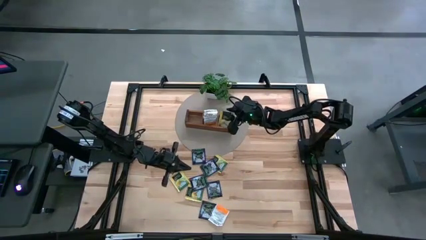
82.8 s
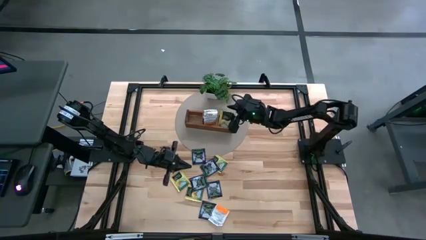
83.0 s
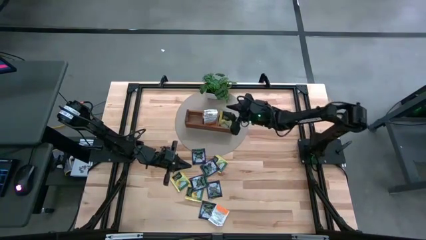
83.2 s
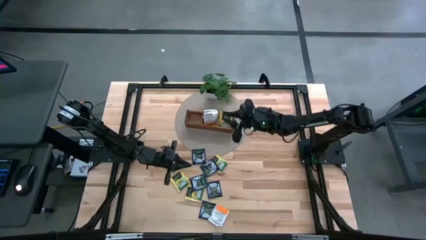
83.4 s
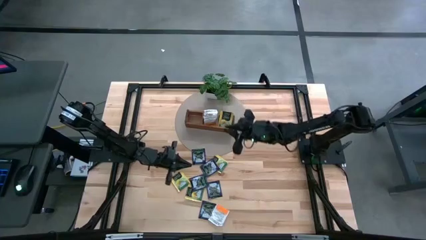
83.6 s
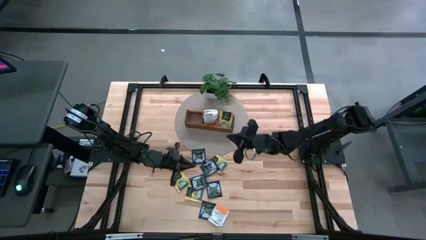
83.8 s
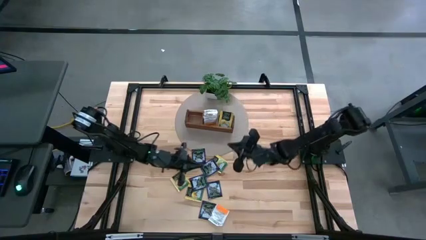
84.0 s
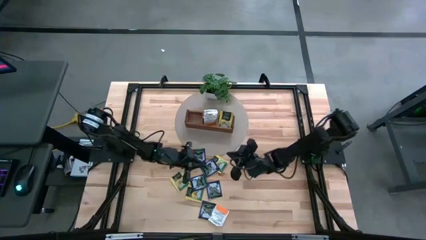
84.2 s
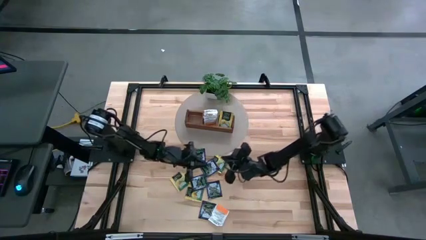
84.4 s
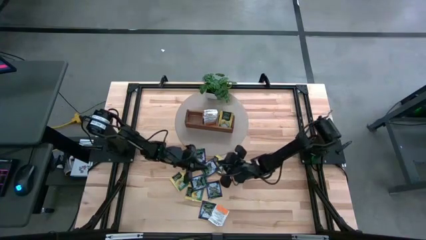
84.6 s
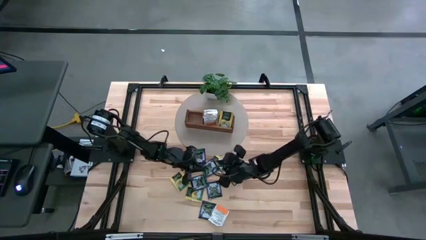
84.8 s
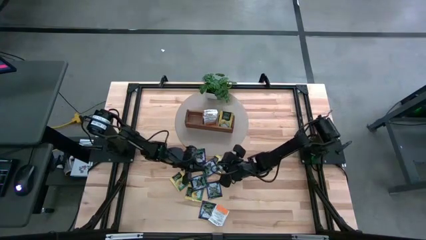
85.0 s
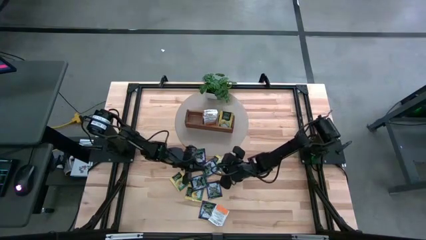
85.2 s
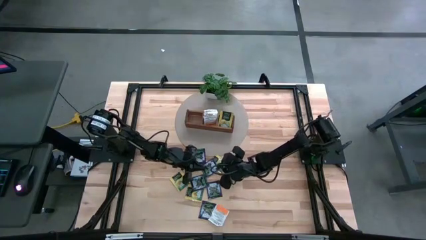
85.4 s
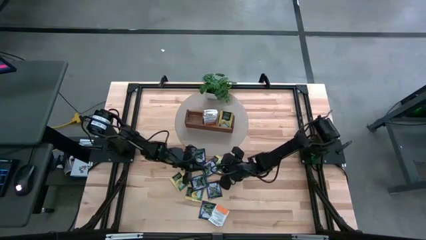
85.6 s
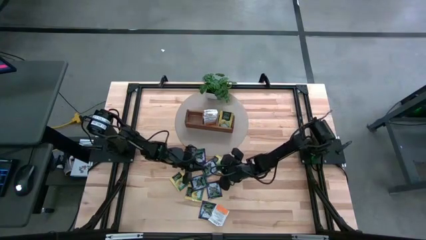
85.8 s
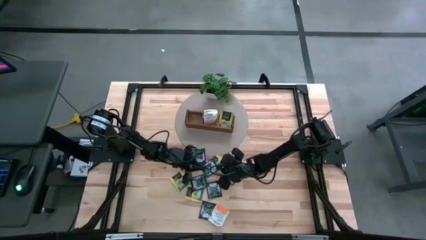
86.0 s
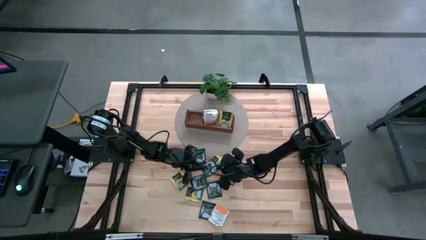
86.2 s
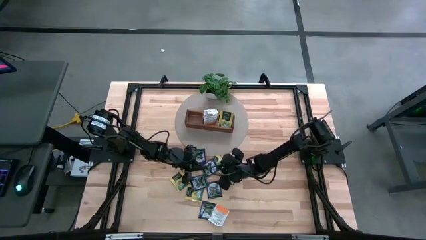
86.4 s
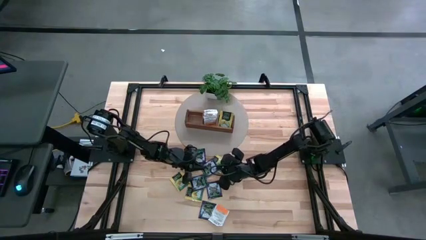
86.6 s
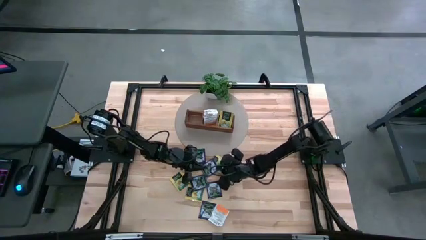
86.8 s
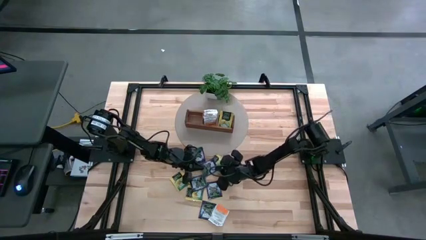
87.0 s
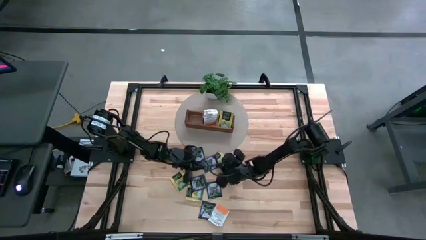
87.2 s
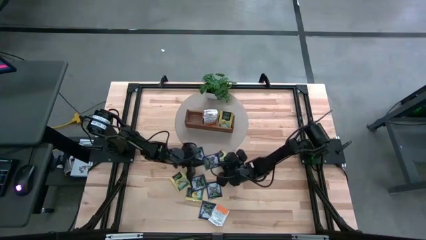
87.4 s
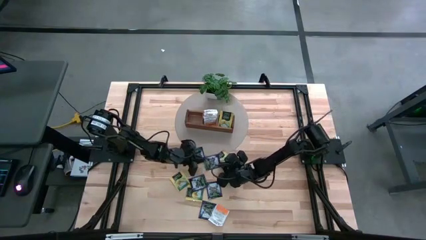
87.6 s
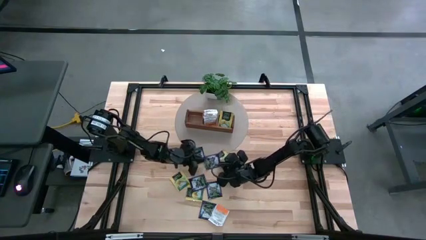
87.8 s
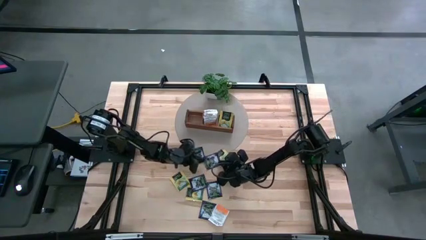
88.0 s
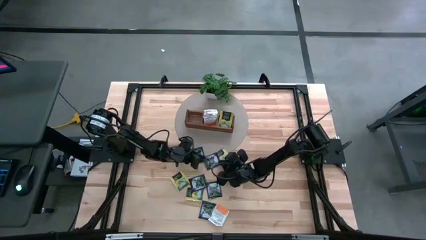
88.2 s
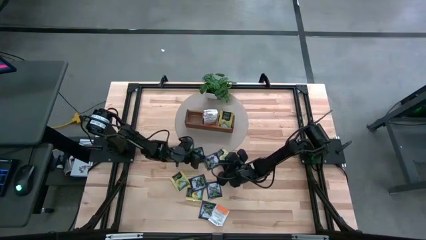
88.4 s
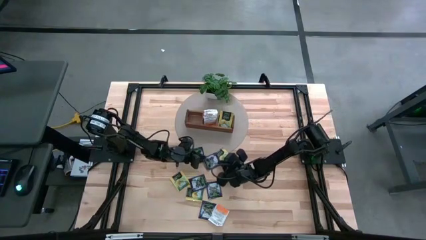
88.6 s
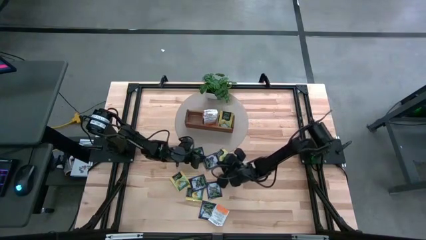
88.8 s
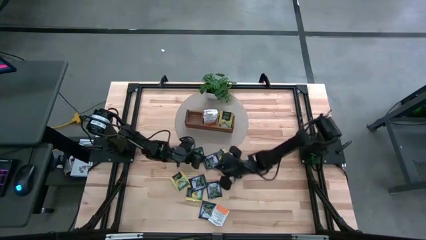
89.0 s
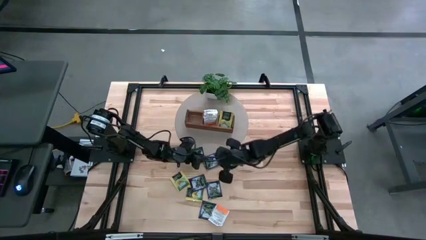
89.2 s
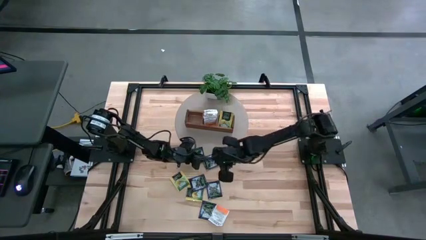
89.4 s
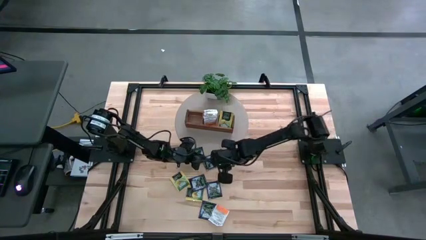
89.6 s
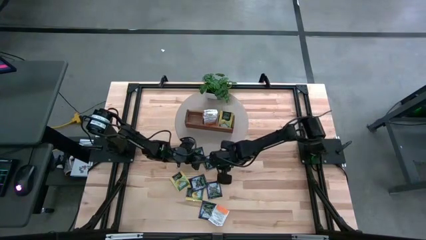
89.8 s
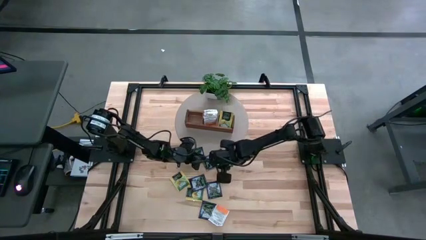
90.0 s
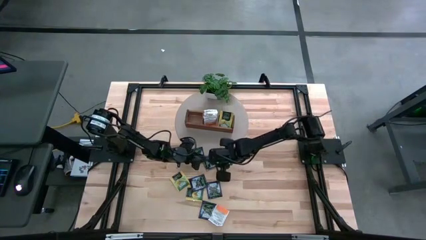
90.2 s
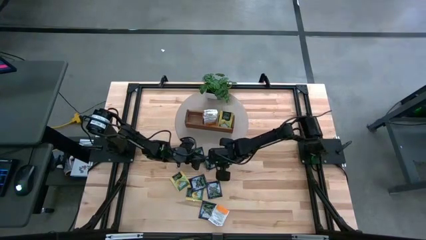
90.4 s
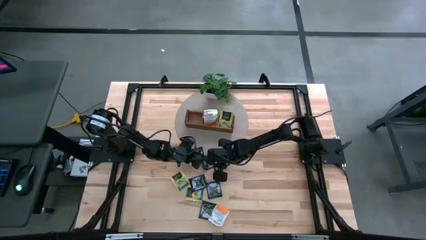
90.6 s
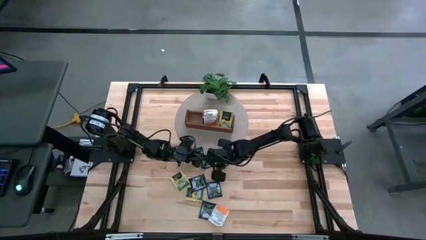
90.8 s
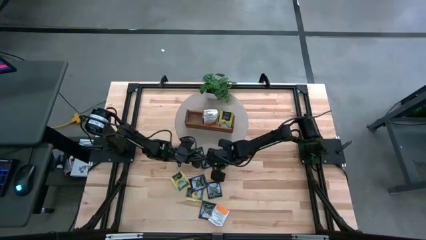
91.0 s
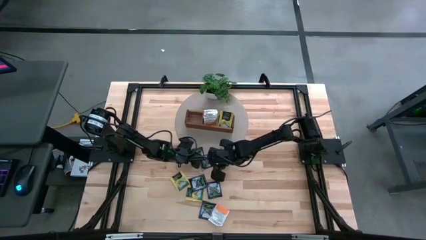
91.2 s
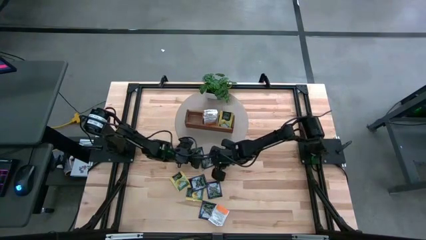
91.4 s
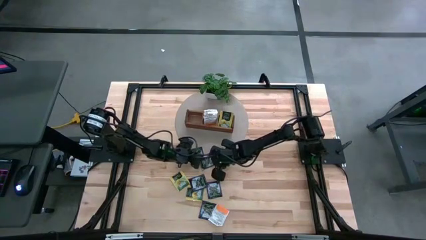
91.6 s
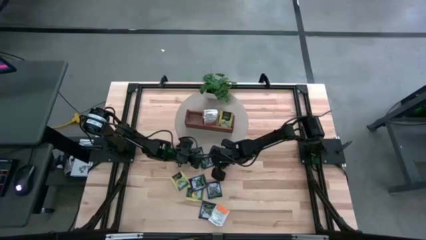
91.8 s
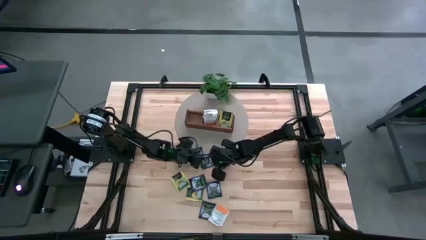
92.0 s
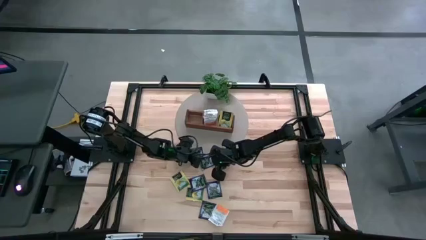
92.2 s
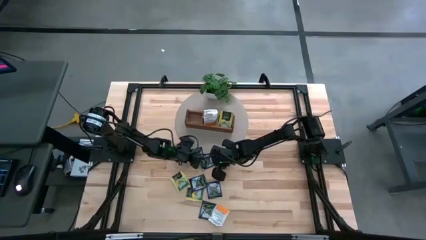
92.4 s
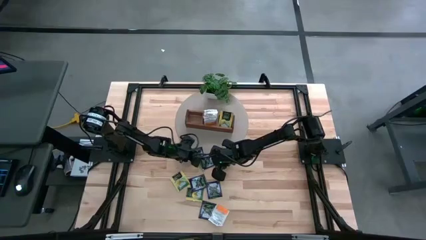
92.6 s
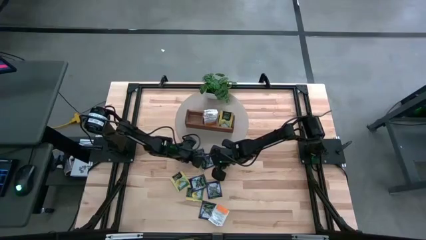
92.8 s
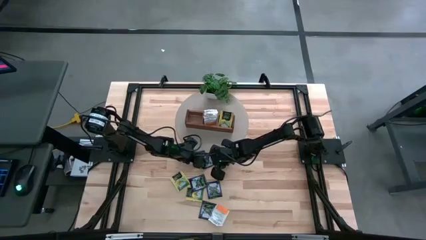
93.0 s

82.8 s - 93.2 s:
Task: Pick & Place Tea
Put the purple tea bag into the left section of the wooden organizer

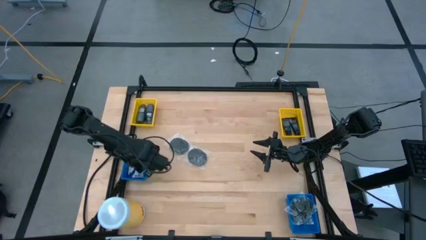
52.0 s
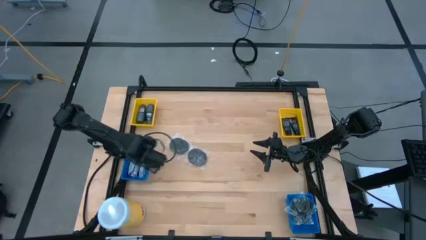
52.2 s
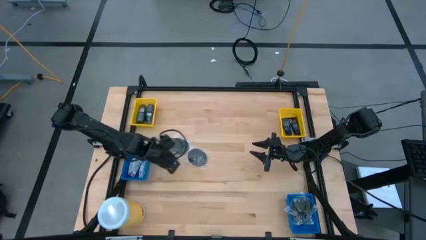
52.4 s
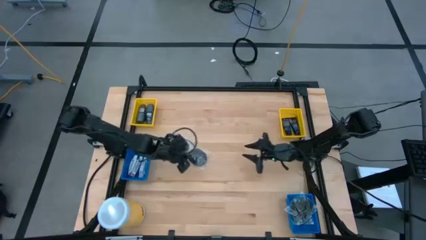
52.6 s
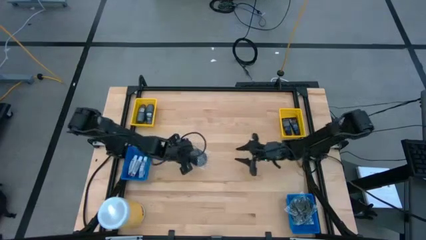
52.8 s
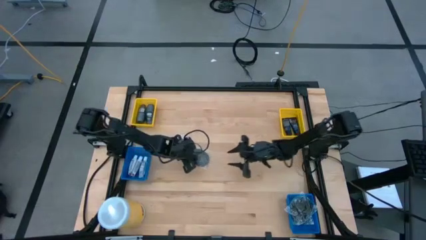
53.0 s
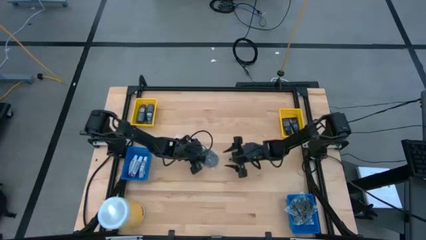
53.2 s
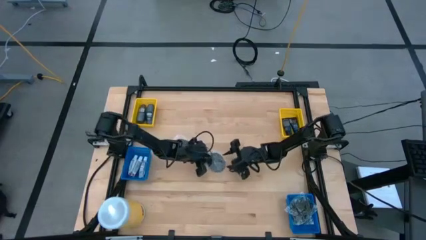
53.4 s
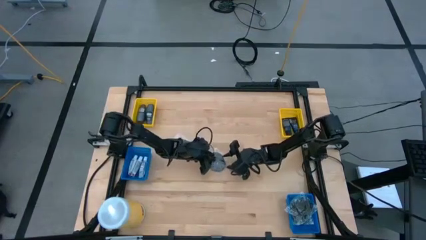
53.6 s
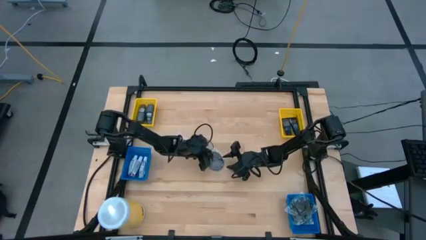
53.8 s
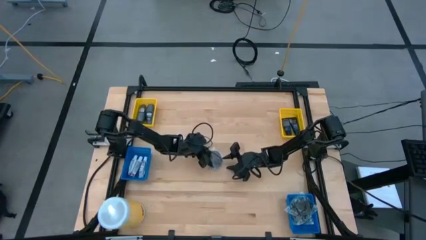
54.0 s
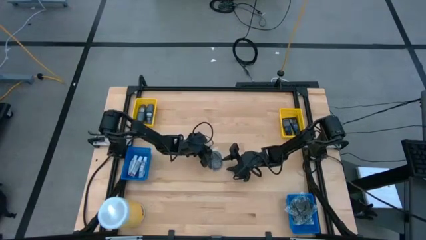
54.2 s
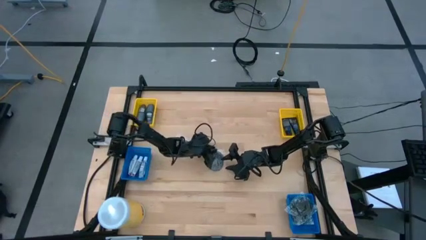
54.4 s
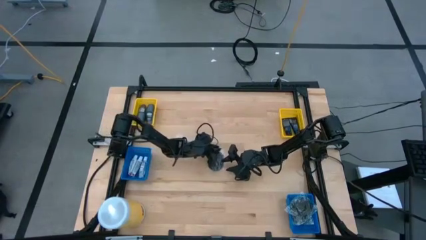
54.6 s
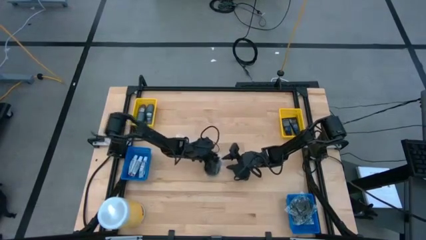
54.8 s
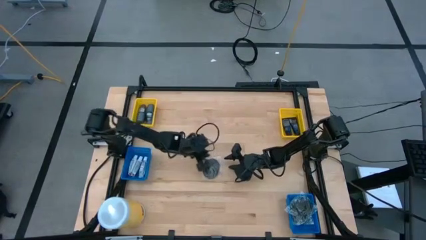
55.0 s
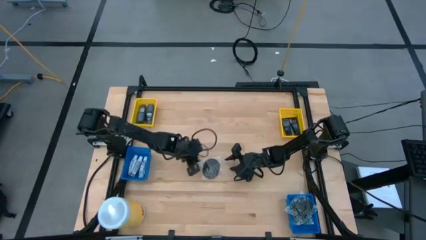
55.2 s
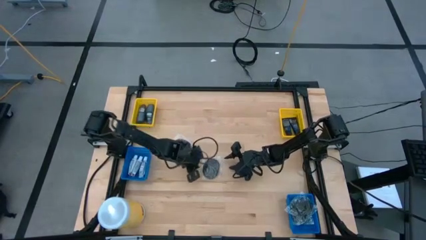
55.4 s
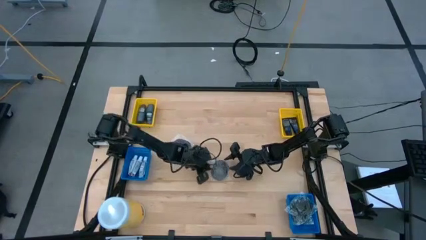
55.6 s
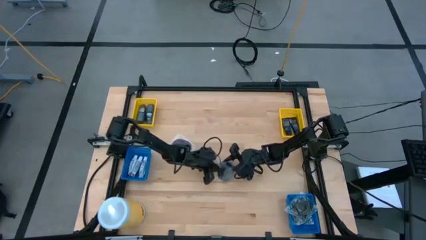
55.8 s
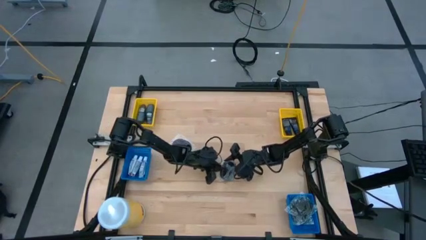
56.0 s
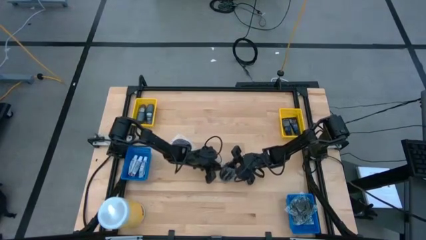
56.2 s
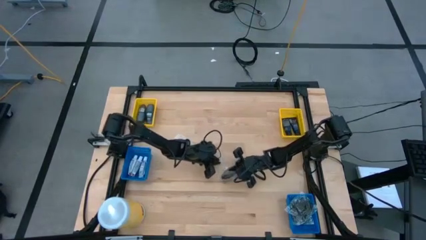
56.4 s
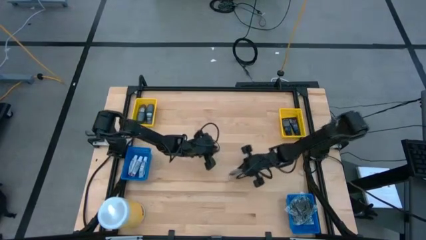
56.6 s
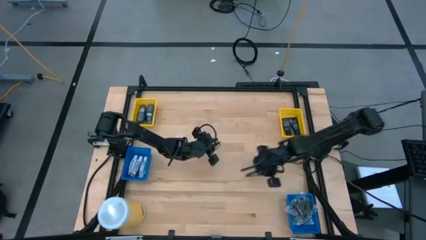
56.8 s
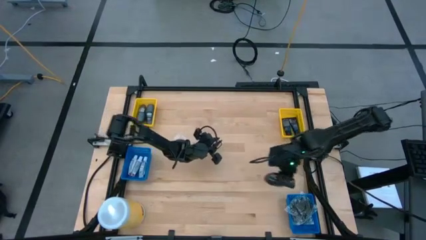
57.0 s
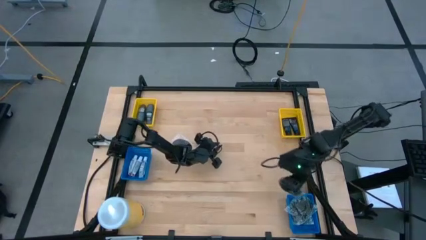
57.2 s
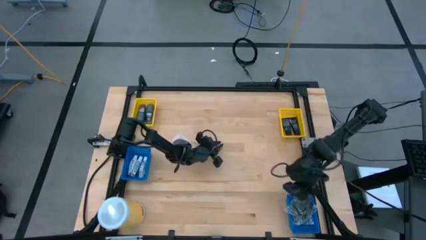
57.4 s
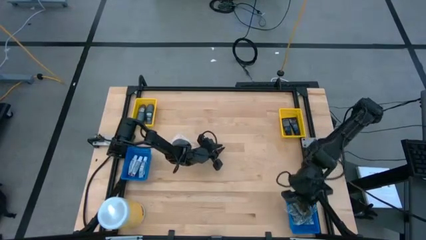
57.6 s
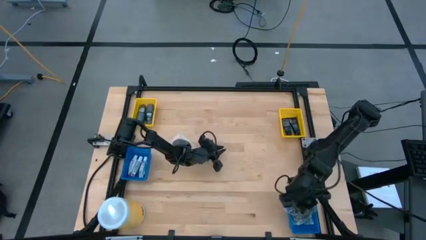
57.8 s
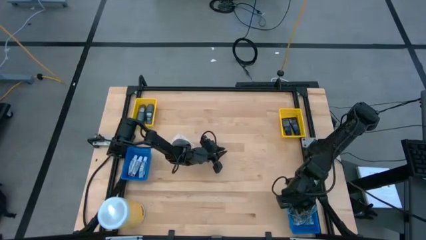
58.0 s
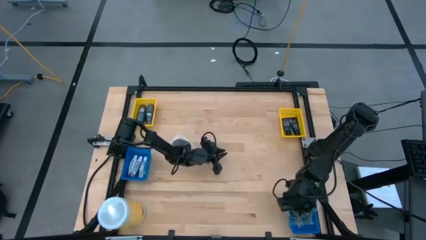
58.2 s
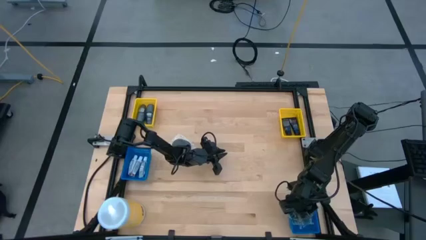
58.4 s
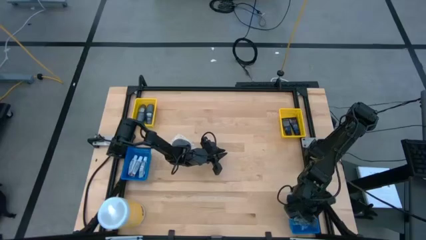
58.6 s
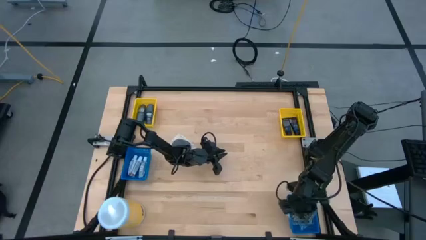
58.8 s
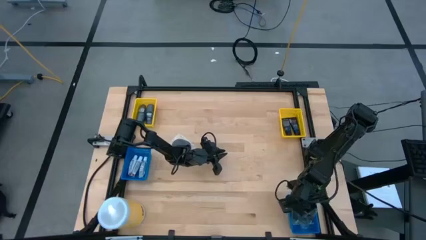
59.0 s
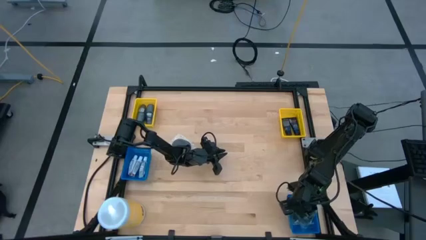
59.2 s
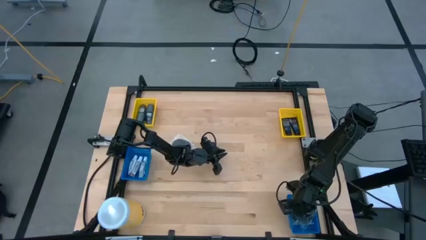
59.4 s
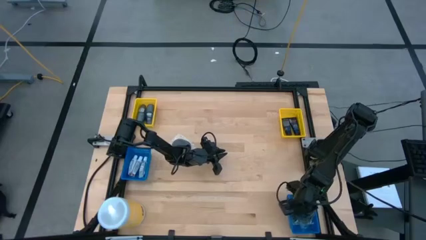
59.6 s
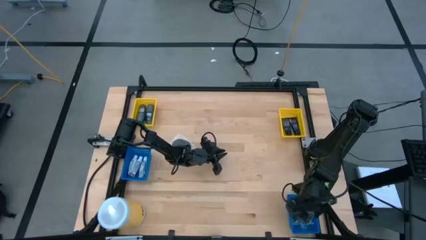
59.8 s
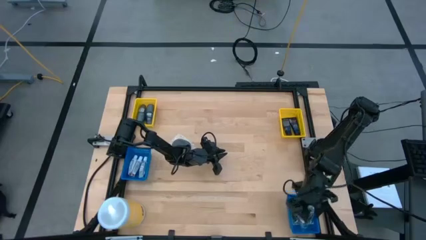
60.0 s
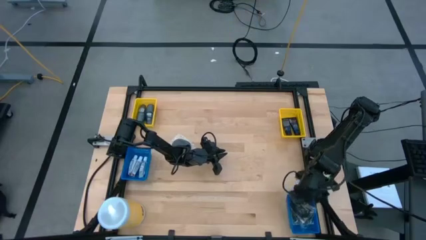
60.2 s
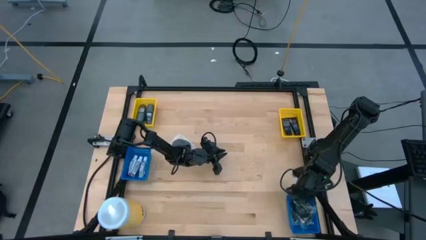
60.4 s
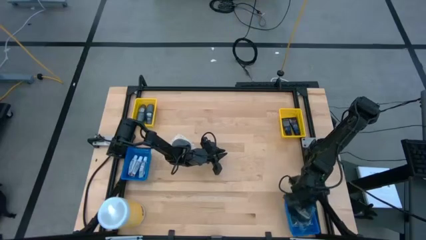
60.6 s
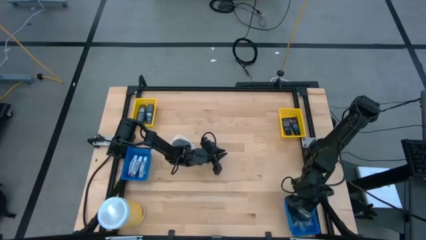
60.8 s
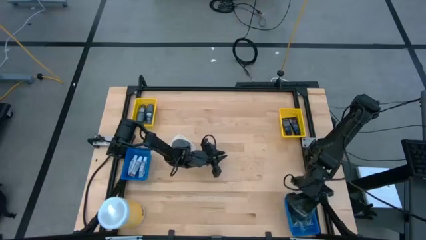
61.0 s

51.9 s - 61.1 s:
Task: Pick & Place Travel size toiletries
Put the black hairbrush into the right blue basket
